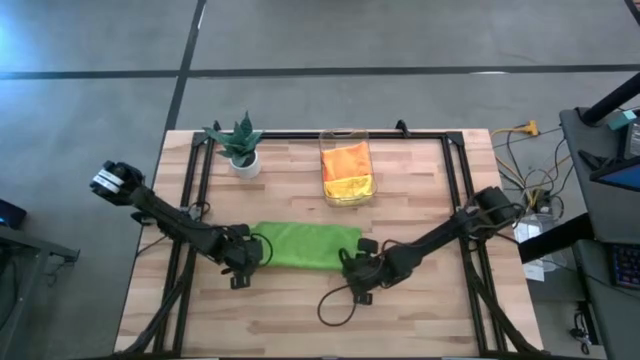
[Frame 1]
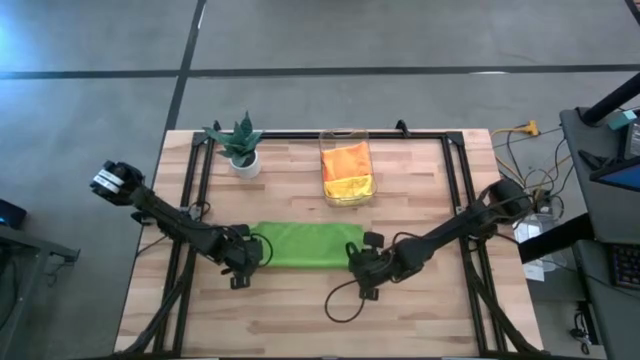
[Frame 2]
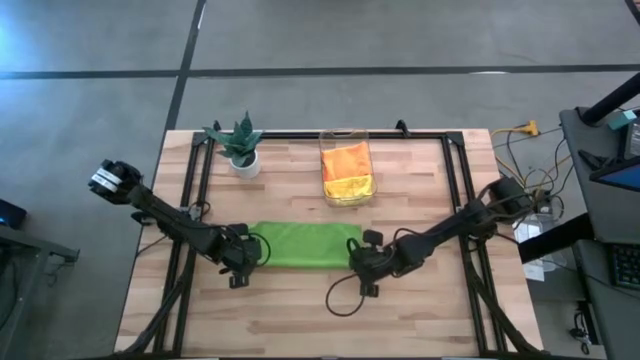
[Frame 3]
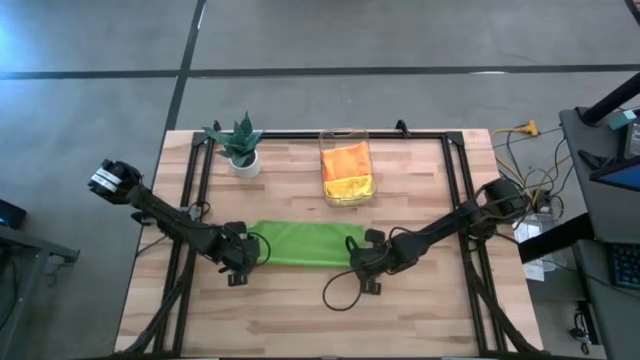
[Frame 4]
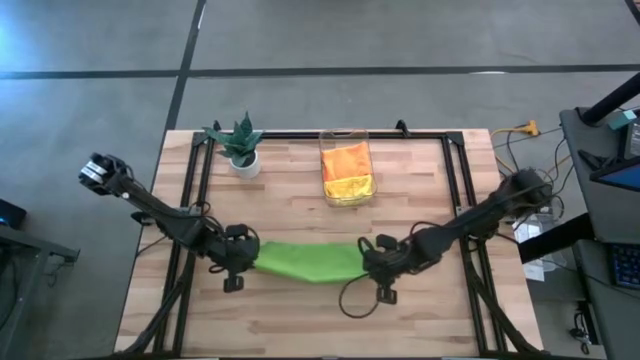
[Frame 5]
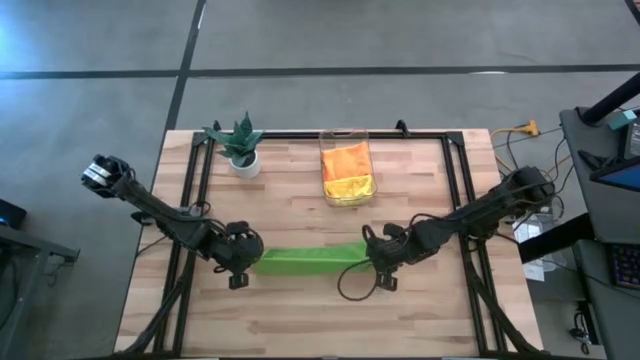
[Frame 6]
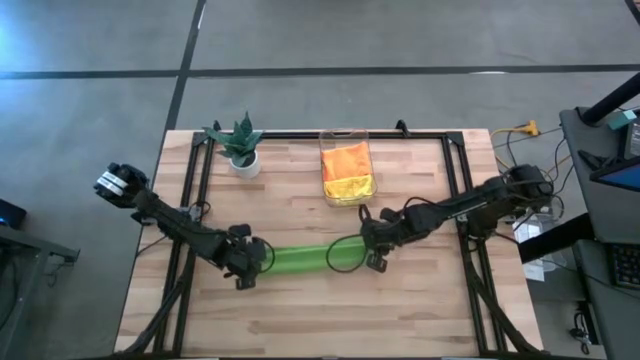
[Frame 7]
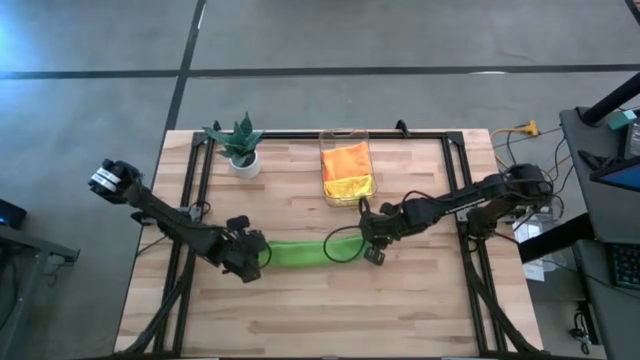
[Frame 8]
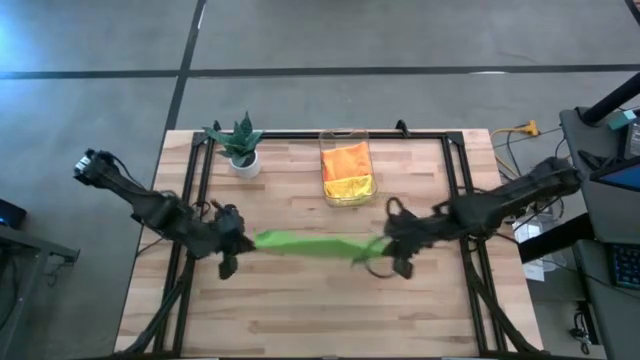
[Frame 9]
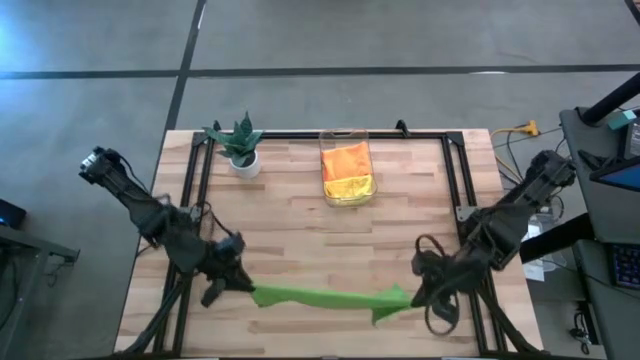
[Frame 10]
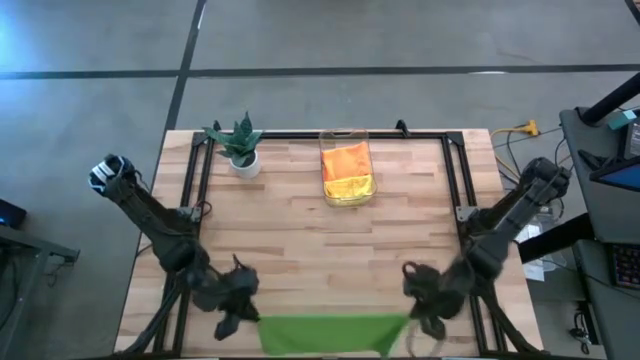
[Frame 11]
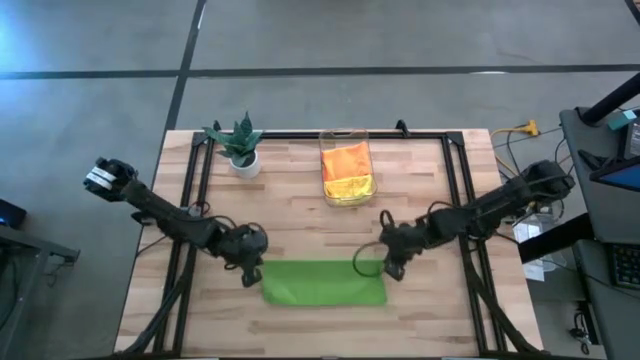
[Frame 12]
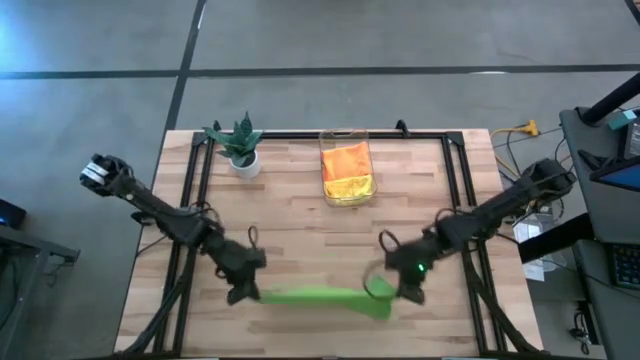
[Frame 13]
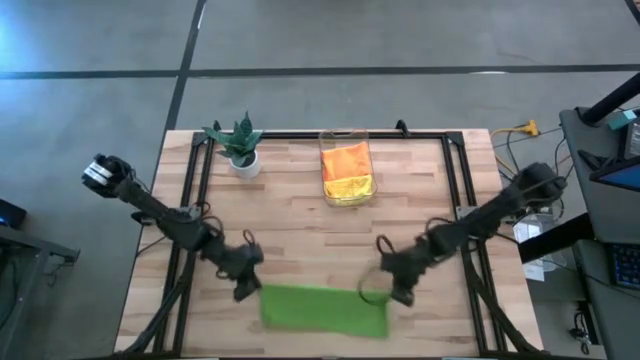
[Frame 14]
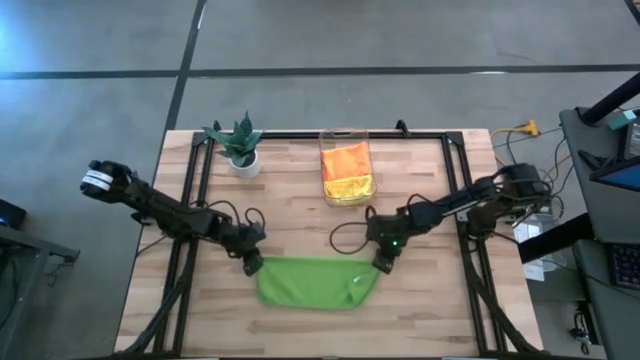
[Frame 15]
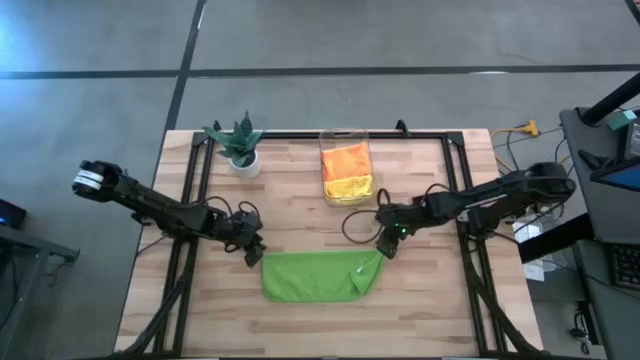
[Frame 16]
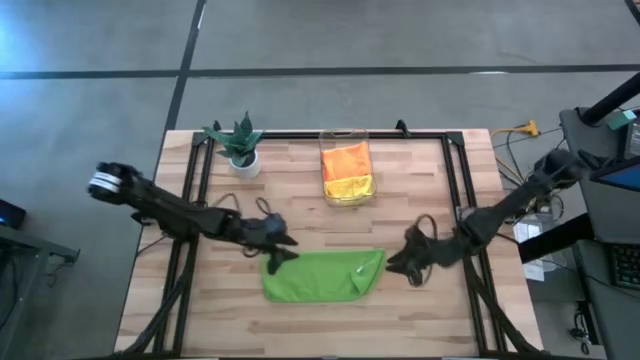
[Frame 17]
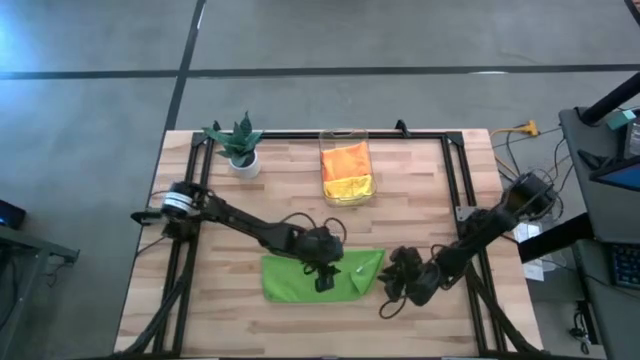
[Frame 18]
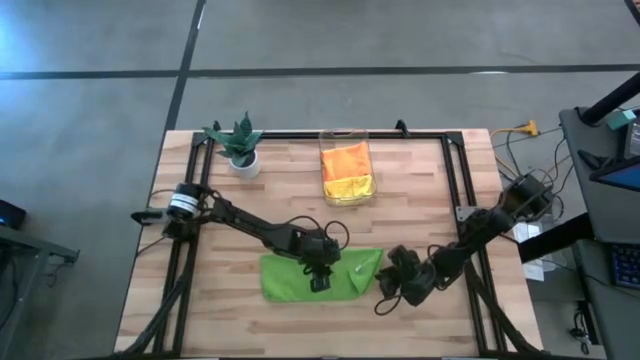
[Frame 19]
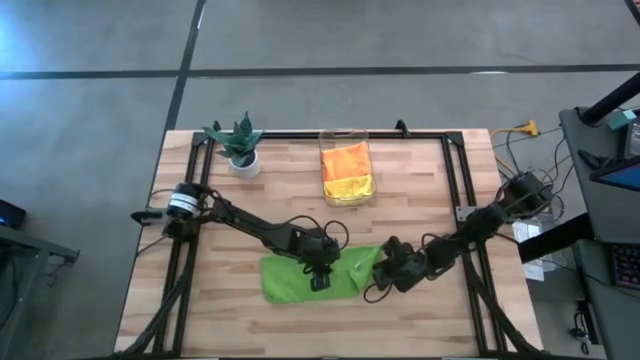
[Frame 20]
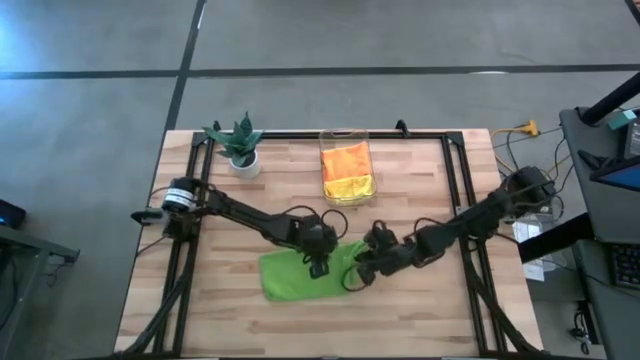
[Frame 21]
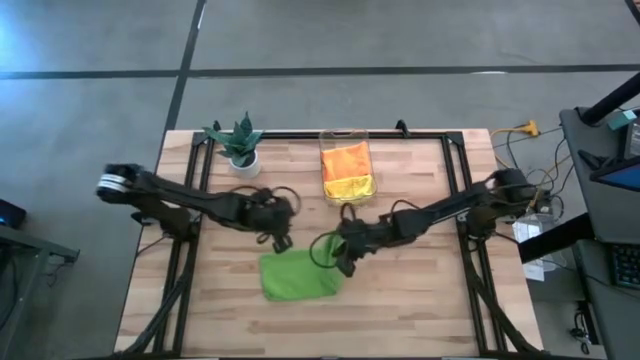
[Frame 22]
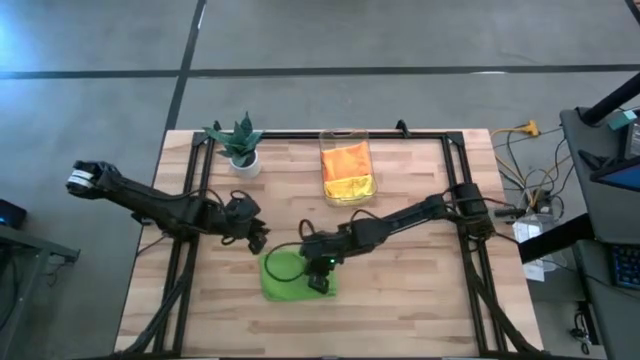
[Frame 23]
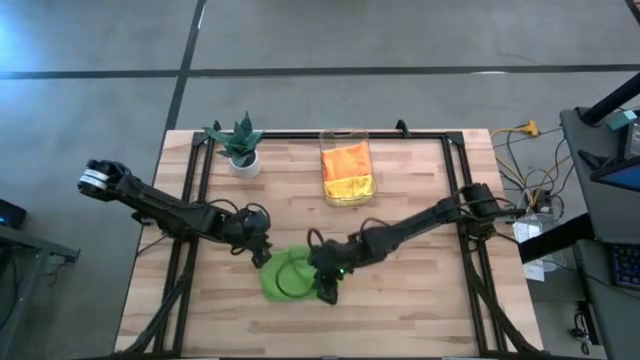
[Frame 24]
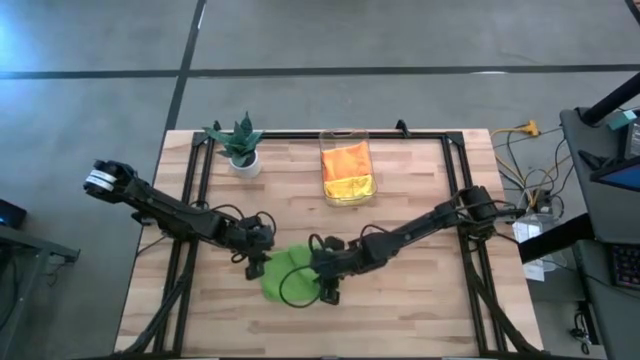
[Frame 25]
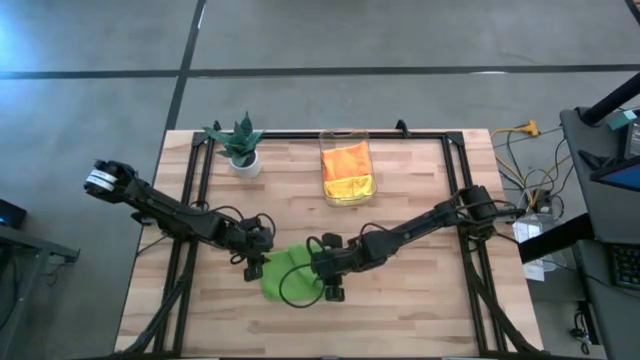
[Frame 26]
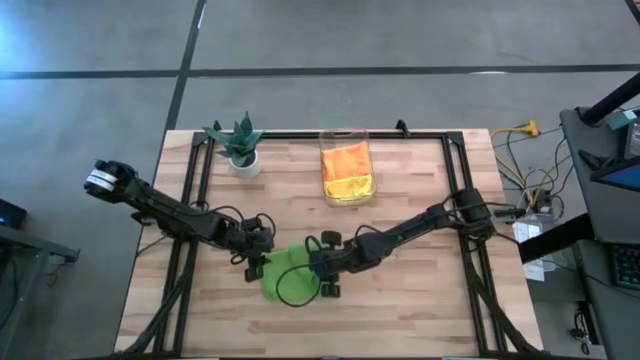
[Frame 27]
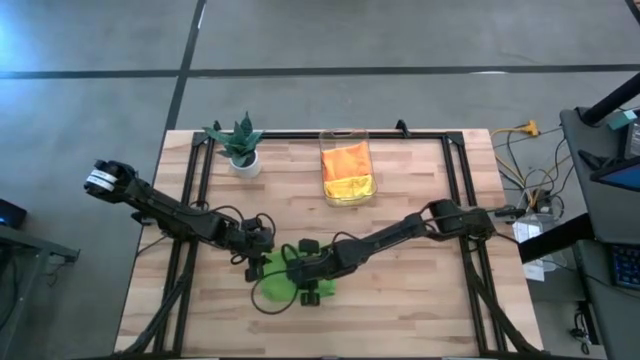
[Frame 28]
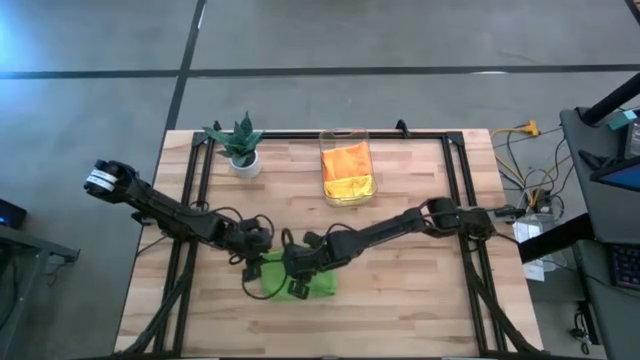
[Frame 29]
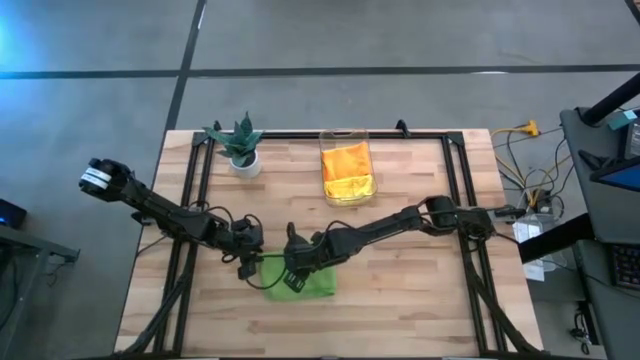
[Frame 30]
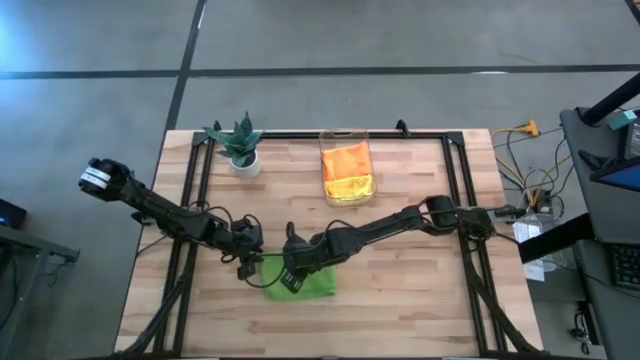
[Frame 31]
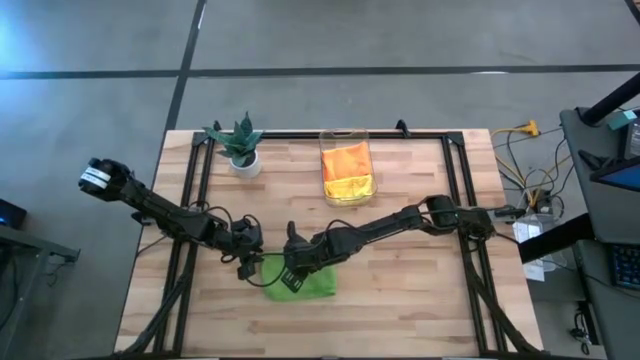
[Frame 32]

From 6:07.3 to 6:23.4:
Task: Fold microfiber towels
Fold the green towel

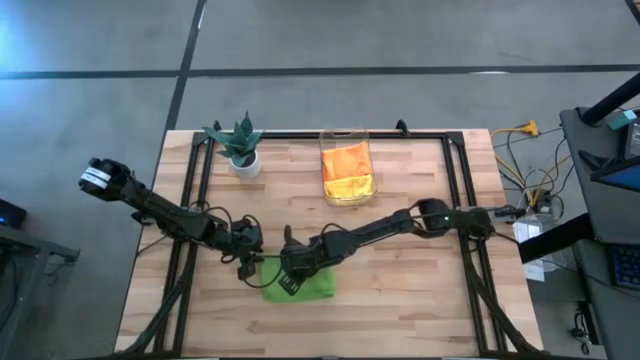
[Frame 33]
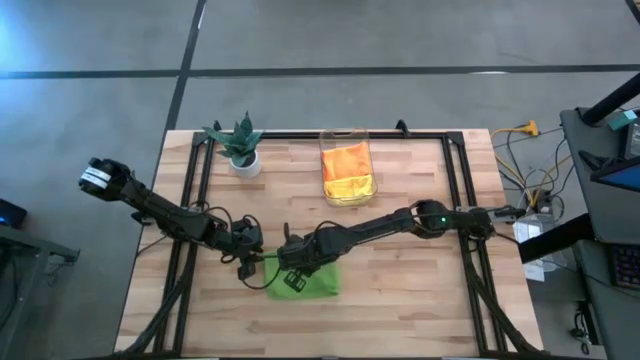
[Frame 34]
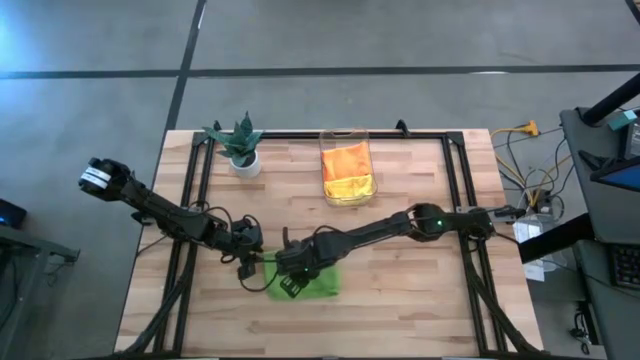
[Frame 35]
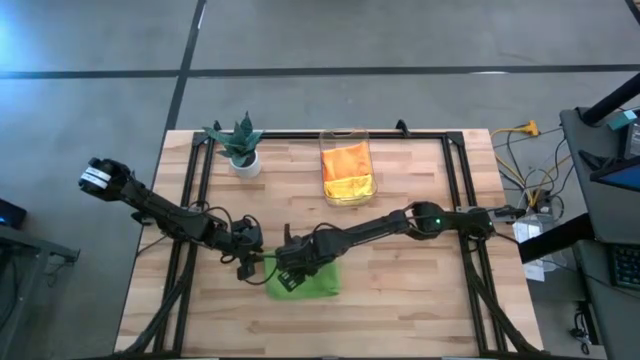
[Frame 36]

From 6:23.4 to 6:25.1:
Fold the green towel

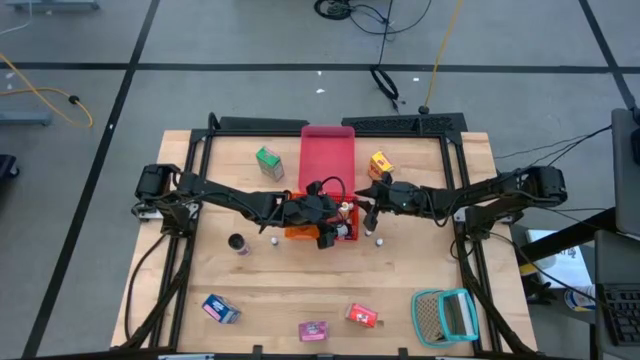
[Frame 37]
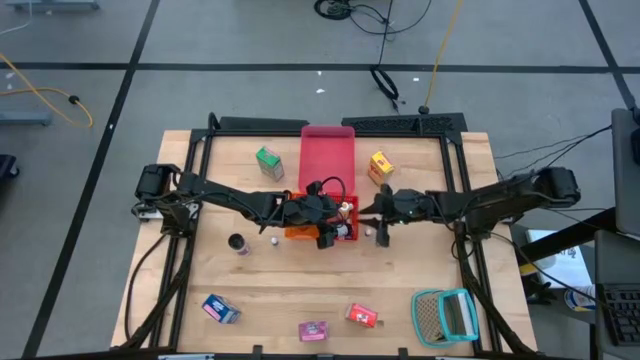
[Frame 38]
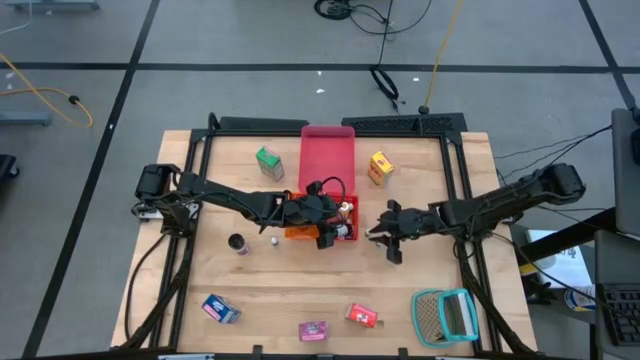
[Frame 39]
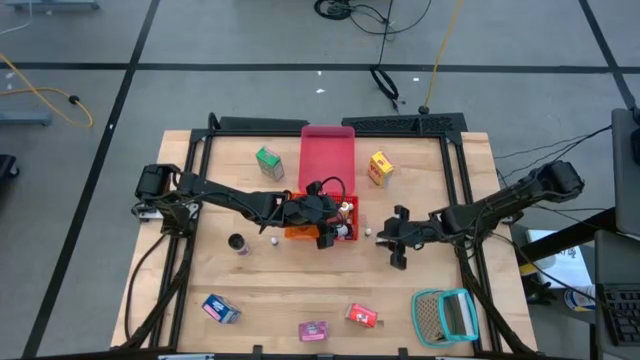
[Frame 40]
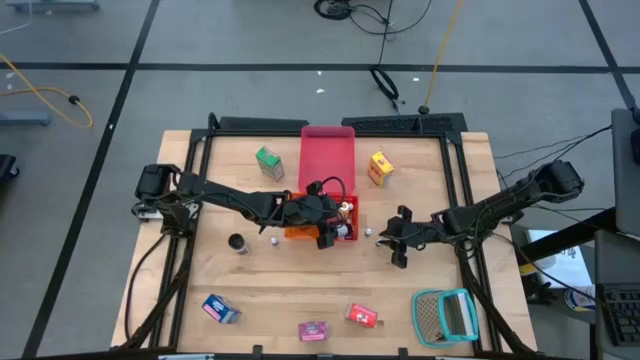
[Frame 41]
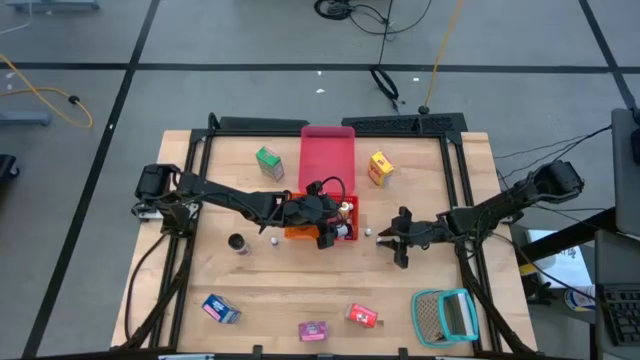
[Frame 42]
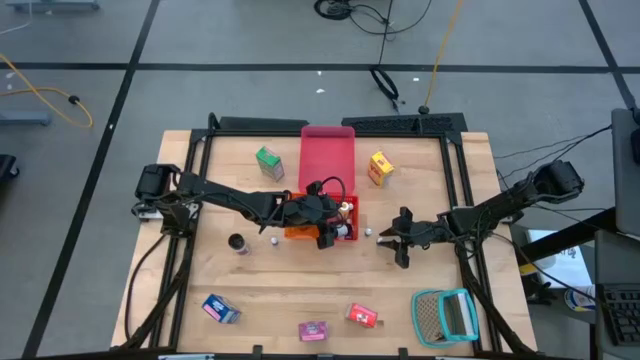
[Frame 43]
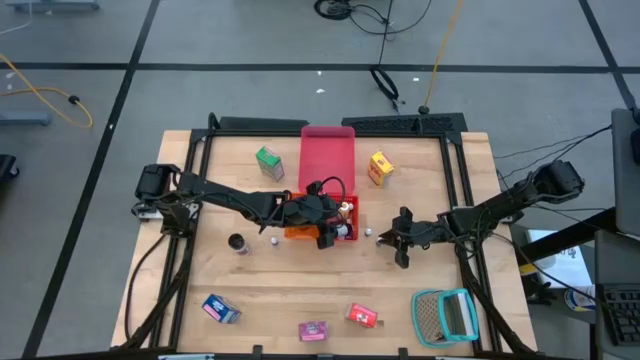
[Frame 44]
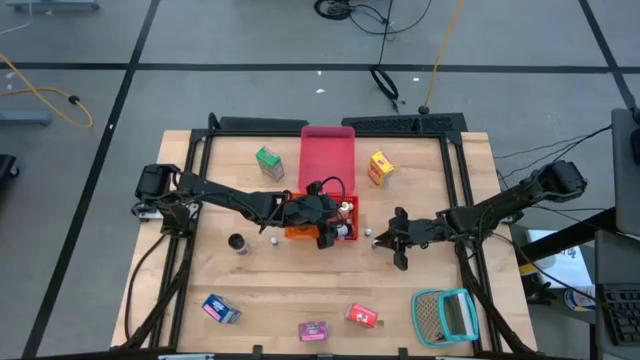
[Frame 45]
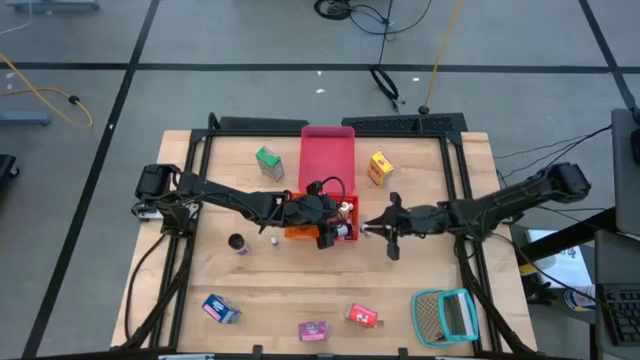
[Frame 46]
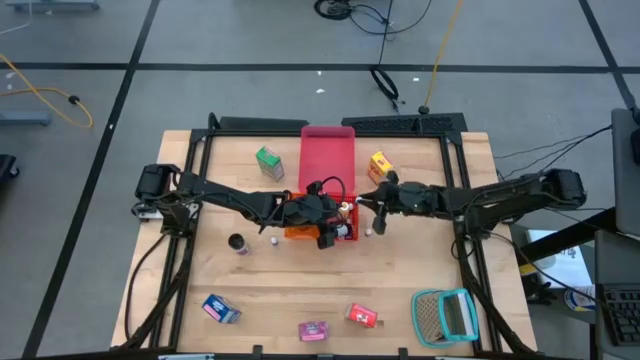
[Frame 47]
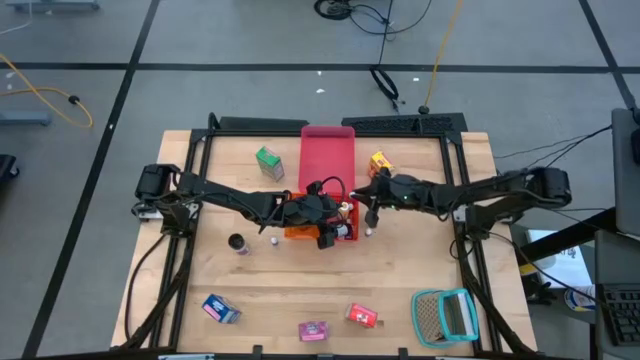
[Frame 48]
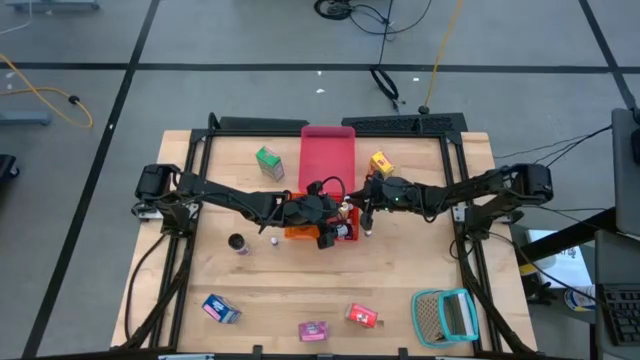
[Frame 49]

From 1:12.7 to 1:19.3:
Task: Pick & Place Kitchen Items
Put the small brown food coloring bottle into the red basket
